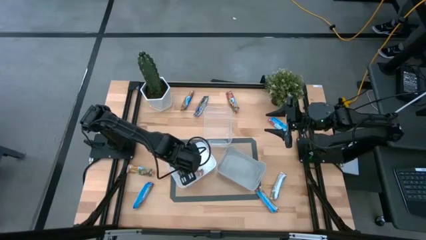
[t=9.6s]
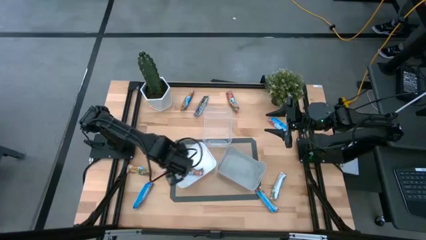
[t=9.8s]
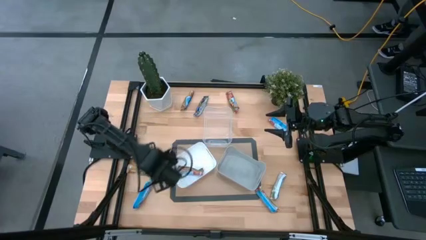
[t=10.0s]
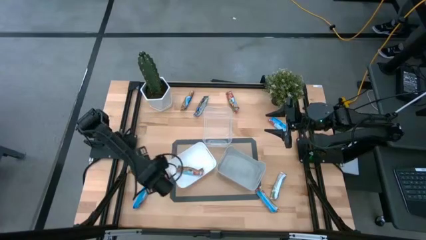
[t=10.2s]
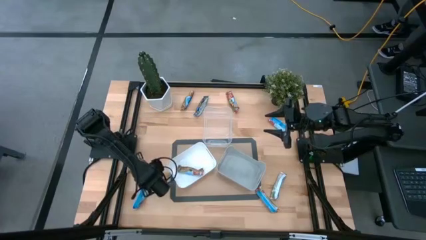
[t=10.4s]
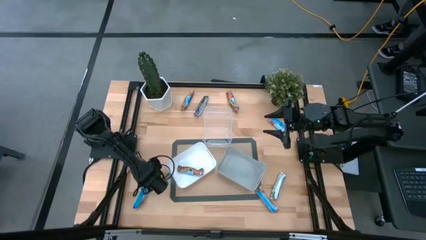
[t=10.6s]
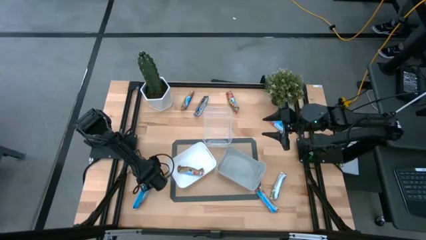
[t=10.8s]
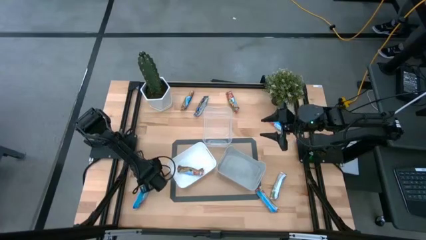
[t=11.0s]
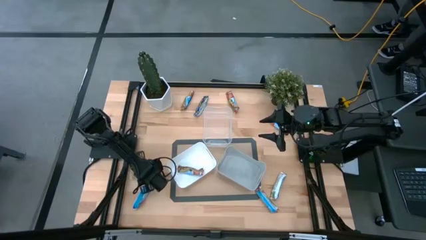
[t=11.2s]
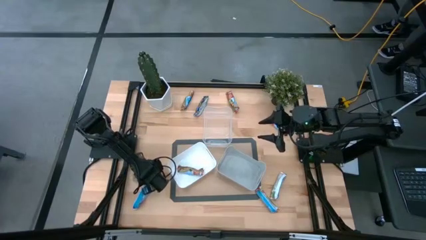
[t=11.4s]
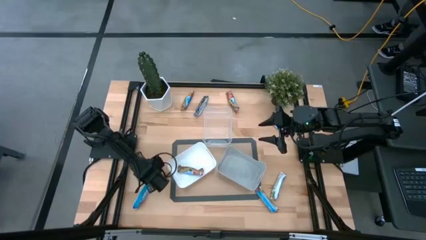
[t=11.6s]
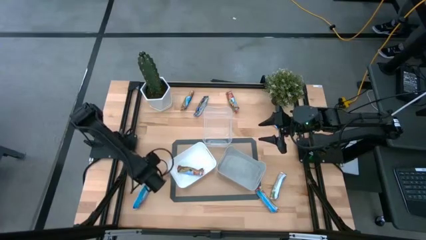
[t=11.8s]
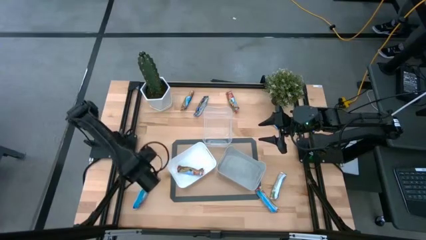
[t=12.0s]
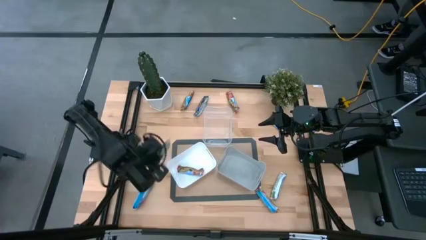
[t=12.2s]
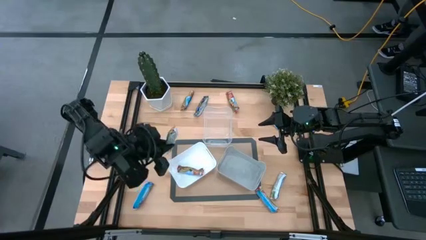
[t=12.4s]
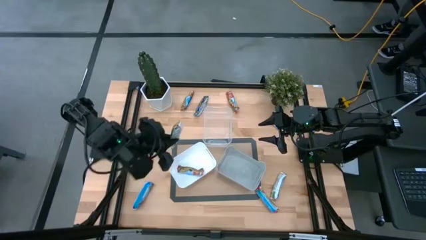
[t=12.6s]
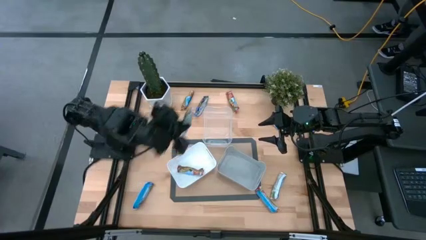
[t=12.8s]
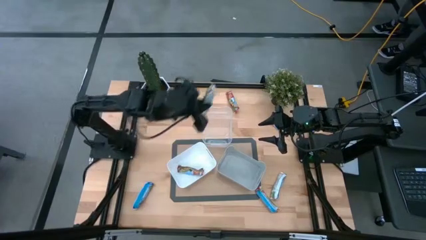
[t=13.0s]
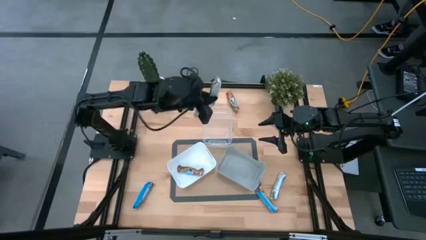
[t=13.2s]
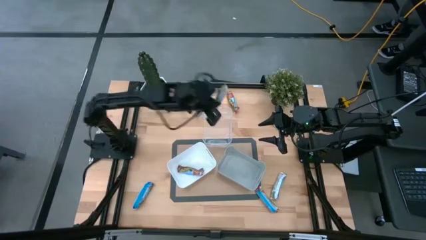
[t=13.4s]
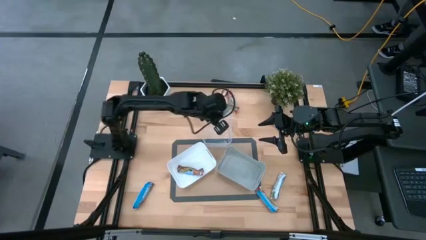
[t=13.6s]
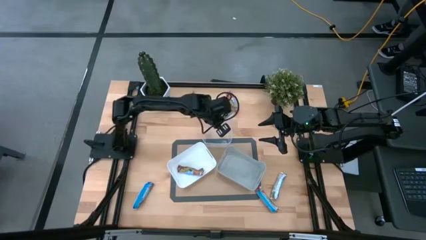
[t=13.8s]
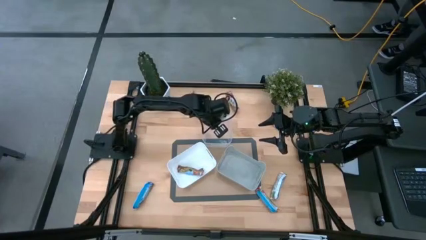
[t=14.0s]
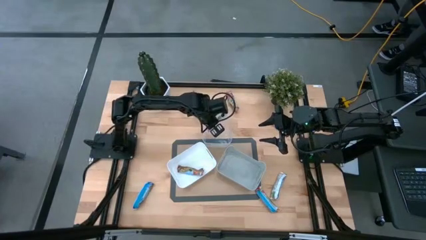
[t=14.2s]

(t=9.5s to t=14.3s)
Task: Pick and place Granola Bars by type
Put the yellow granola bar into the transparent bin

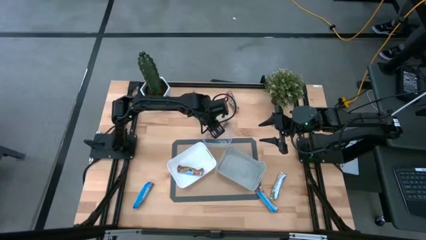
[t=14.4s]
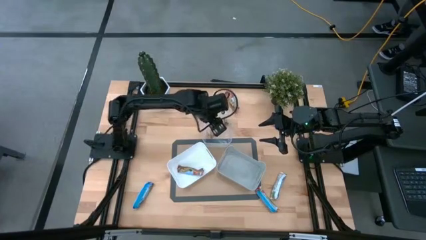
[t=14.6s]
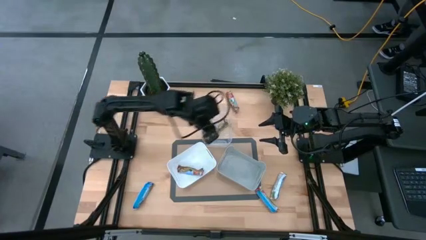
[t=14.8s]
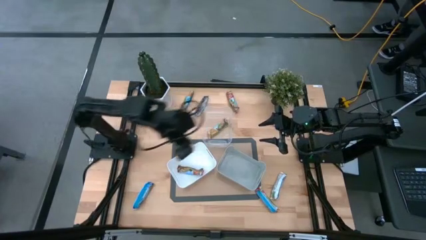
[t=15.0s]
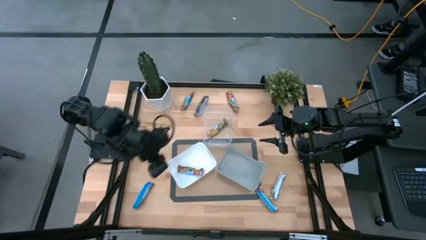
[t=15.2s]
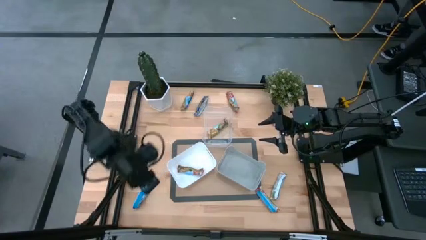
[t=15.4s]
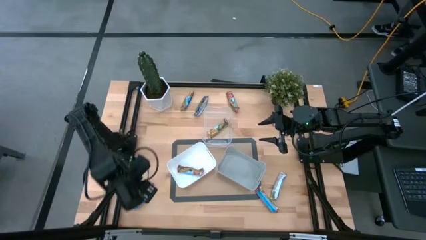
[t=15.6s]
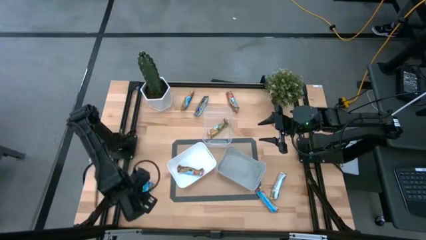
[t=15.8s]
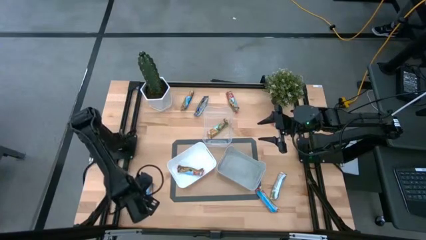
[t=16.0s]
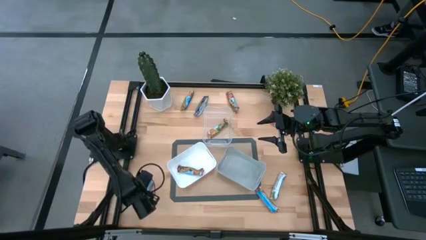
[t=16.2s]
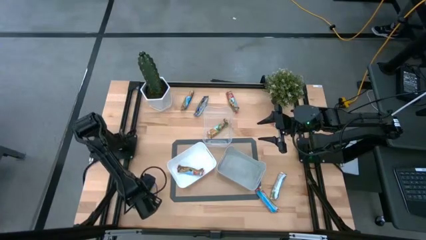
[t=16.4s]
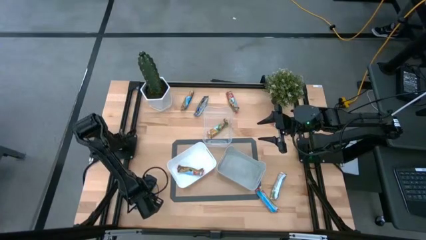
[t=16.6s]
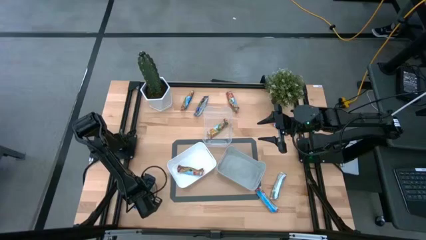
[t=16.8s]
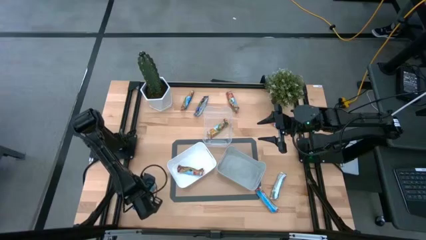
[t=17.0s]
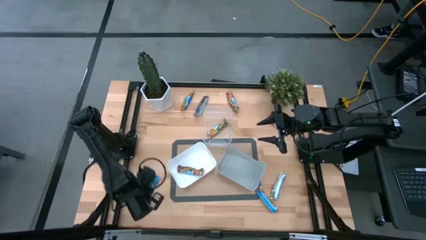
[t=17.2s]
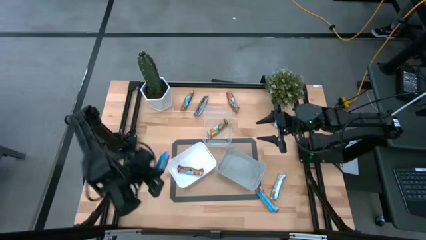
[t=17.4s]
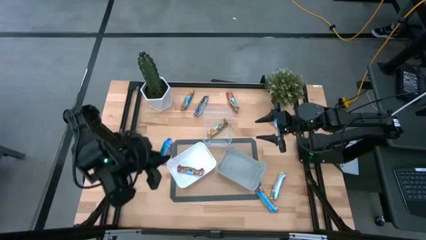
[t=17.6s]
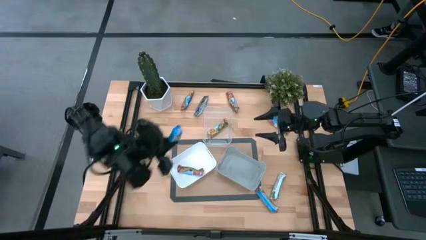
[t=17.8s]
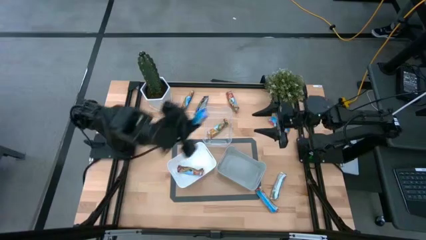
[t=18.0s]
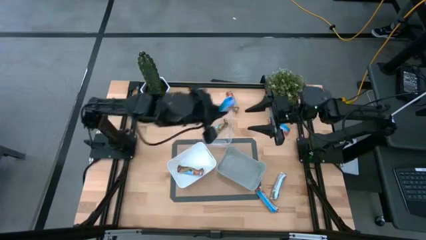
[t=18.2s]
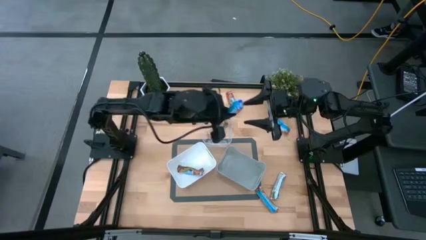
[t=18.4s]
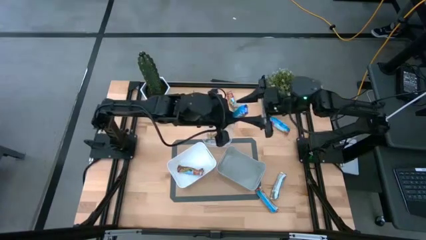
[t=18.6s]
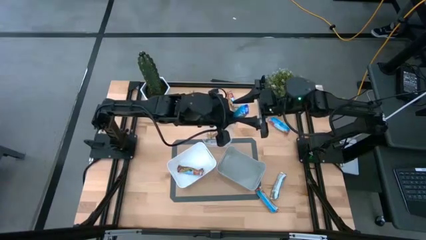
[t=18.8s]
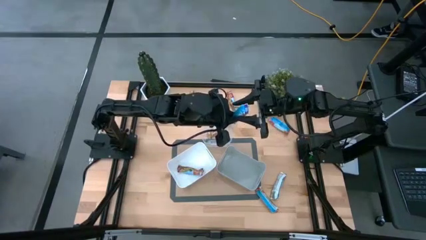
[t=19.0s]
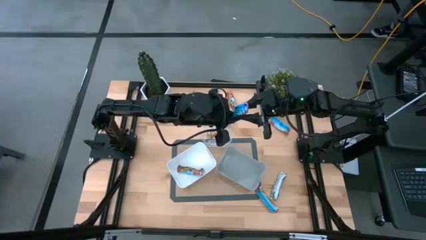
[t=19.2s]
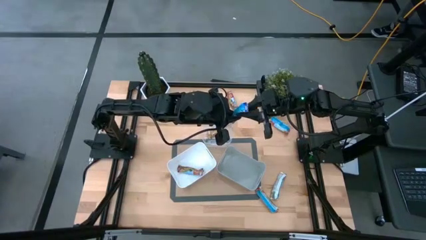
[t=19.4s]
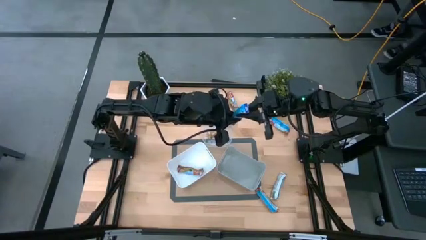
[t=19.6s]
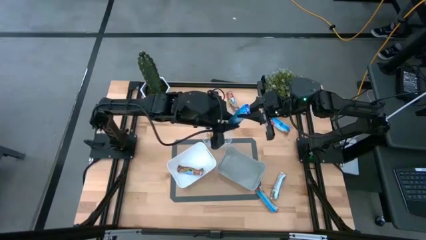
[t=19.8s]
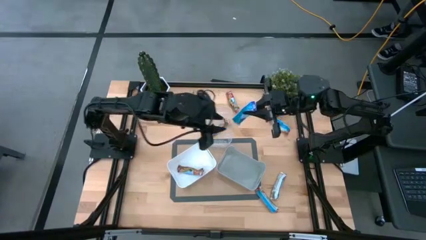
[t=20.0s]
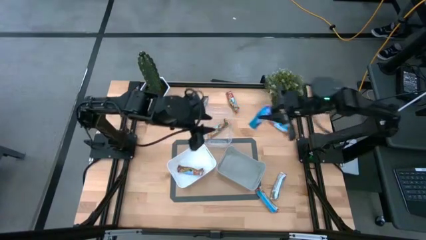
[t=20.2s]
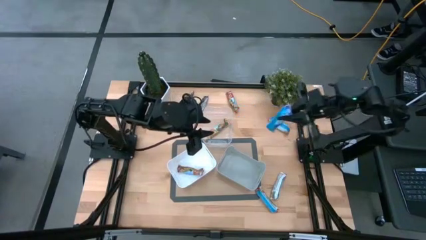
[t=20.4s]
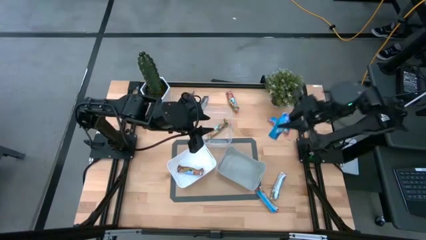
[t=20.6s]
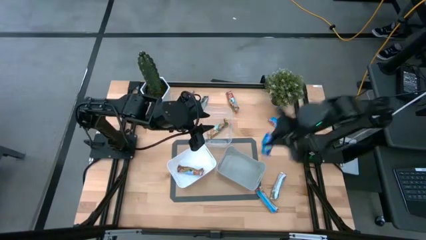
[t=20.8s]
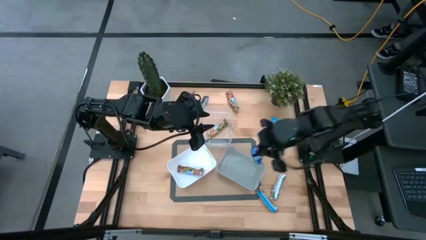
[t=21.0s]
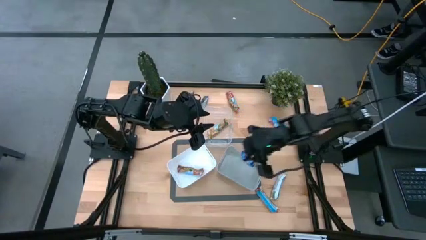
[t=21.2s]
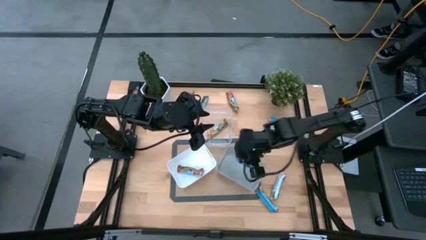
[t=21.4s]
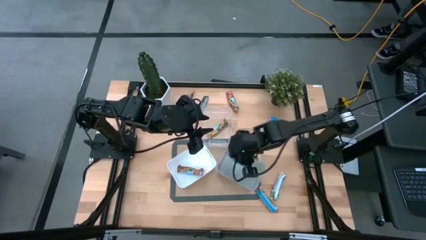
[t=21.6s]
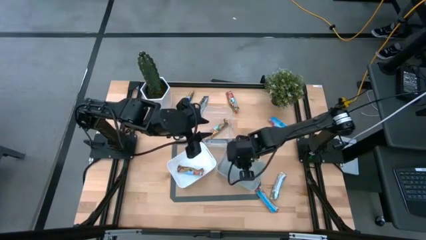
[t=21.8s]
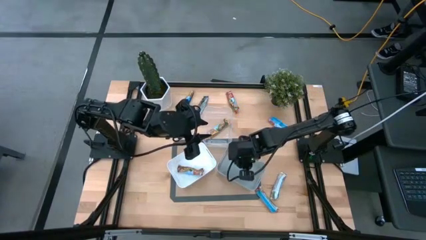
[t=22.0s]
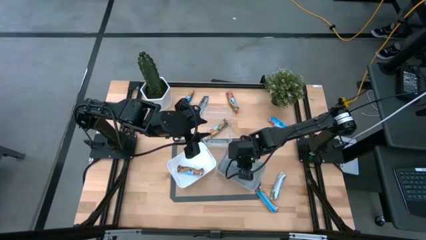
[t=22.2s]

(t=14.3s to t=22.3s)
Put the blue granola bar into the gray bin

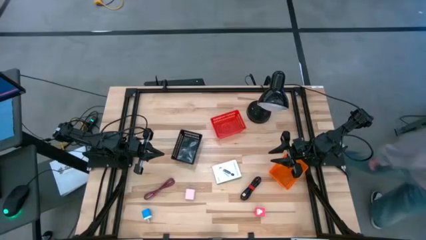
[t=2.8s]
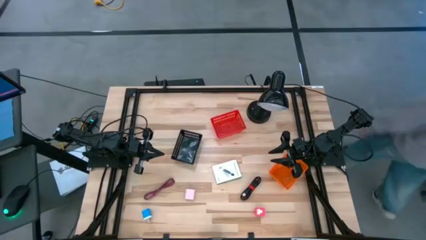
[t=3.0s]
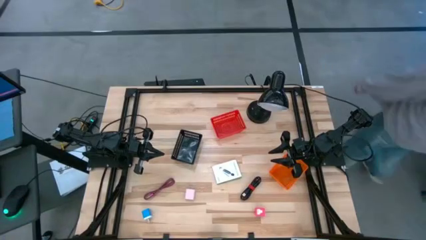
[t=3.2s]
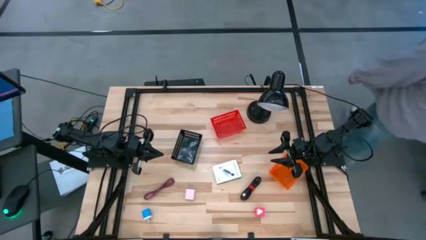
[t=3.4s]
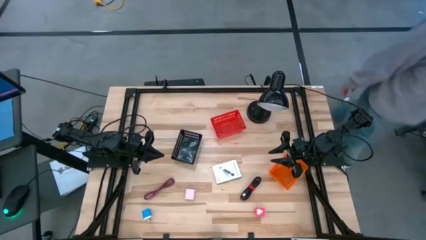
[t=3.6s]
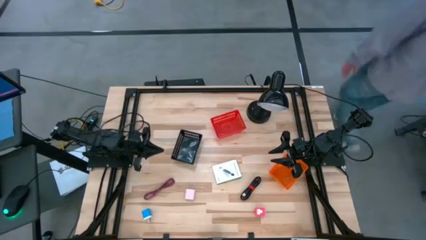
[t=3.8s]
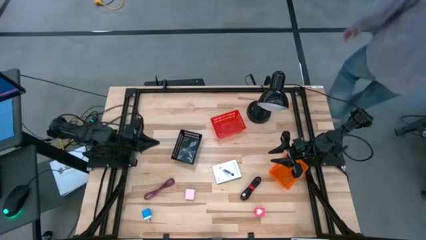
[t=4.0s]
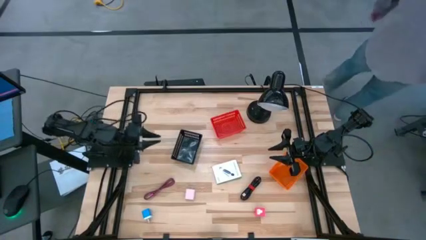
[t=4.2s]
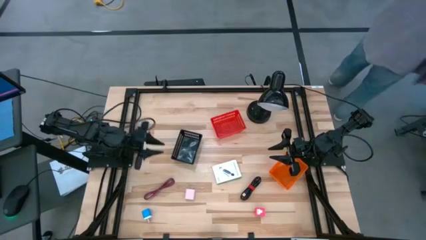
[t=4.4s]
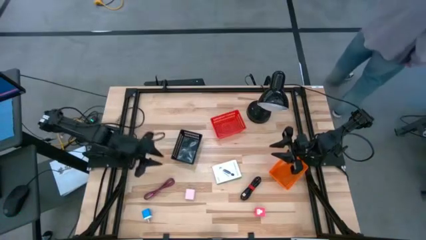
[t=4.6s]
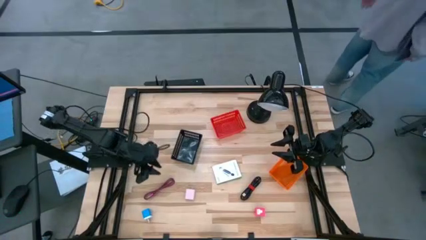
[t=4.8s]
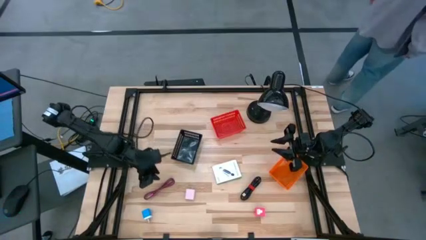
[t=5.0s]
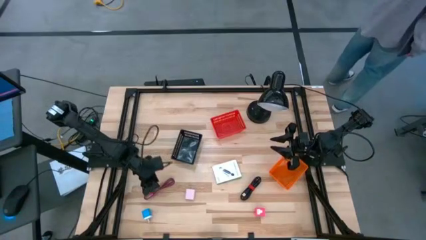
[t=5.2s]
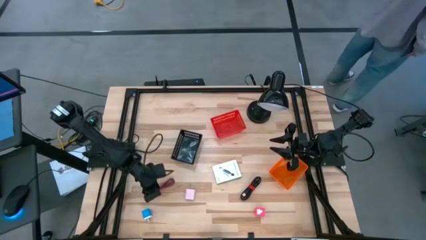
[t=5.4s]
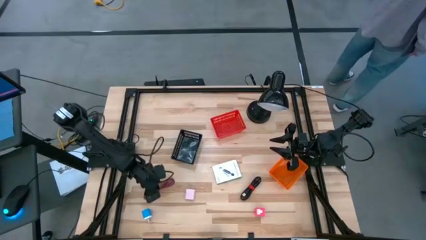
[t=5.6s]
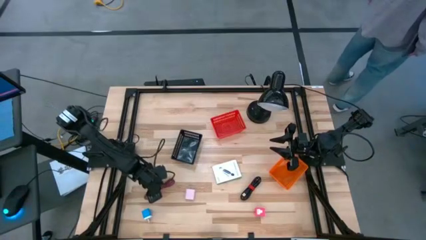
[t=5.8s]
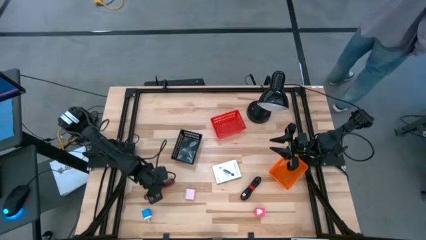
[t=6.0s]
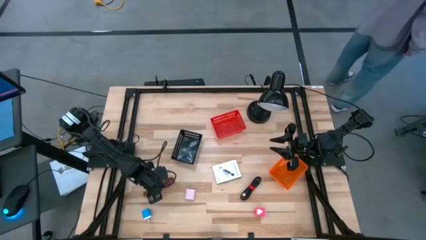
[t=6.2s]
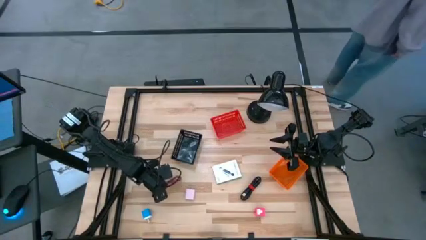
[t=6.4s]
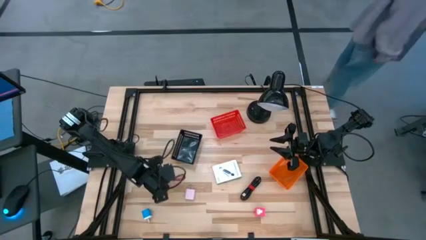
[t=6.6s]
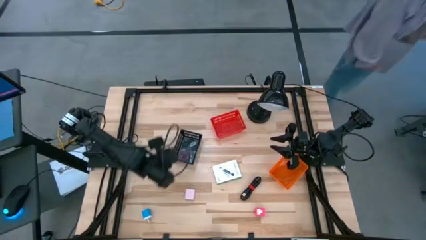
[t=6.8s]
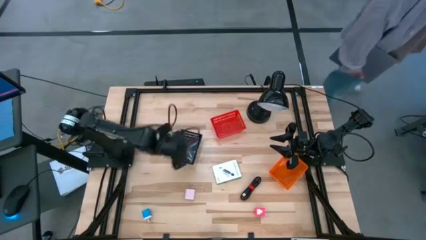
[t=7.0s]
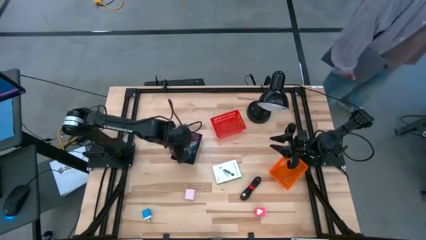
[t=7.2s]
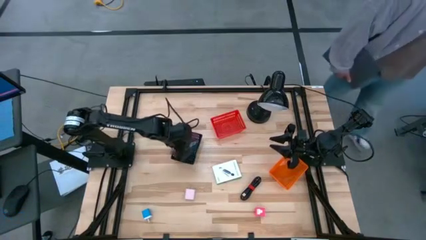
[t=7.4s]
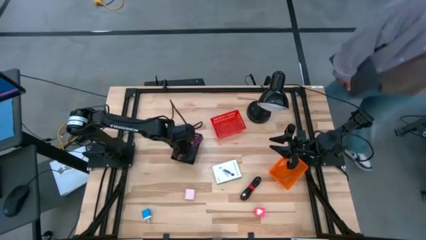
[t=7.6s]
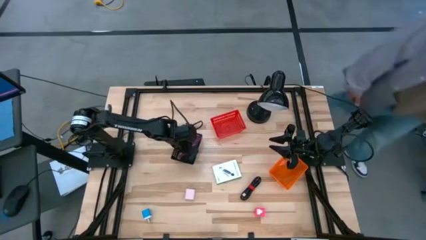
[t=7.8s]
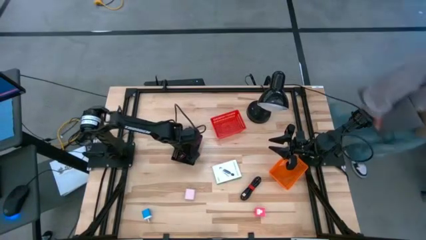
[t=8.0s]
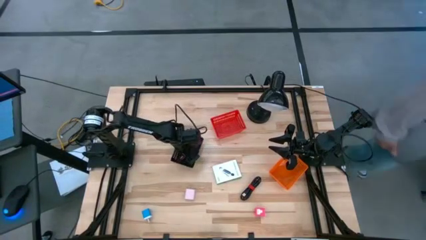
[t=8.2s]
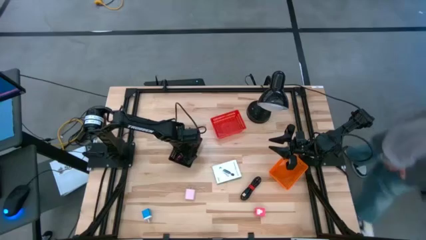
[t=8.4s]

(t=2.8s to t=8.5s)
Task: Pick and place items into bin
Put the pink charger cable into the black bin
